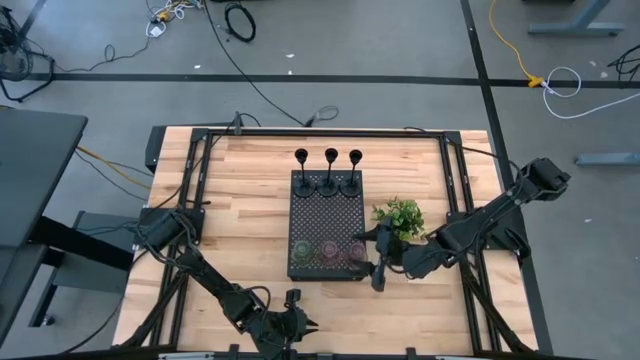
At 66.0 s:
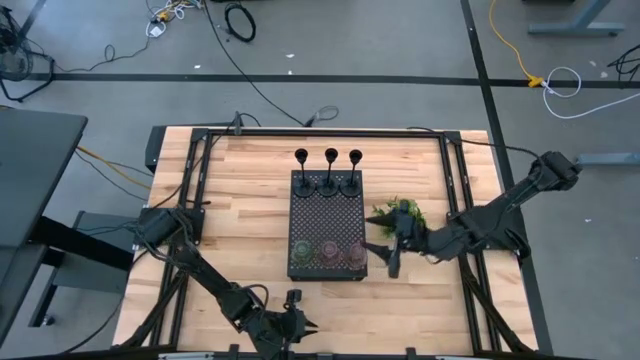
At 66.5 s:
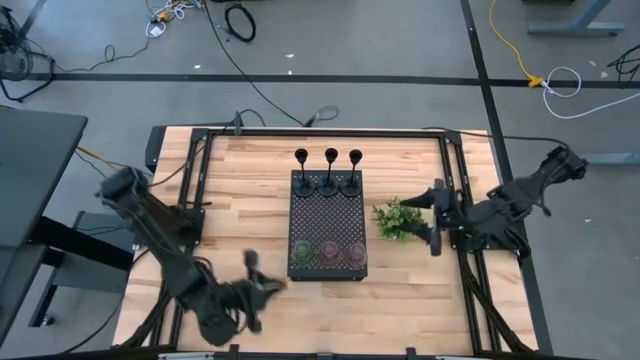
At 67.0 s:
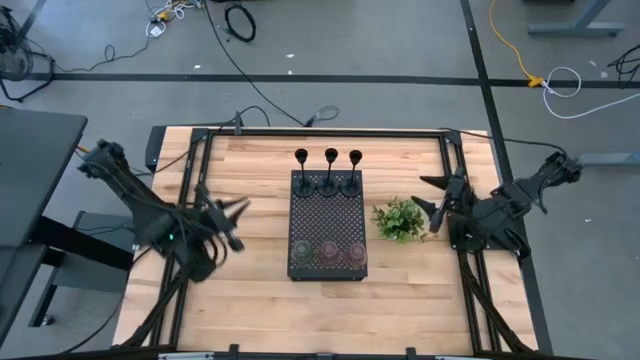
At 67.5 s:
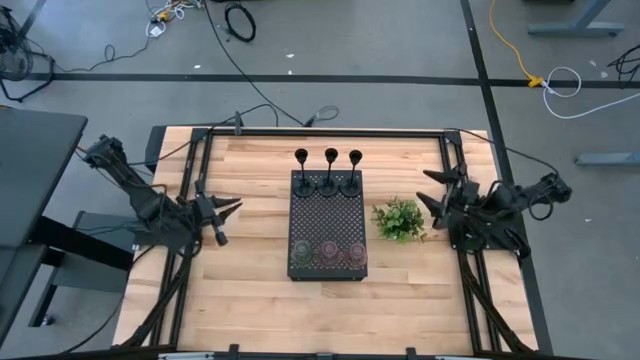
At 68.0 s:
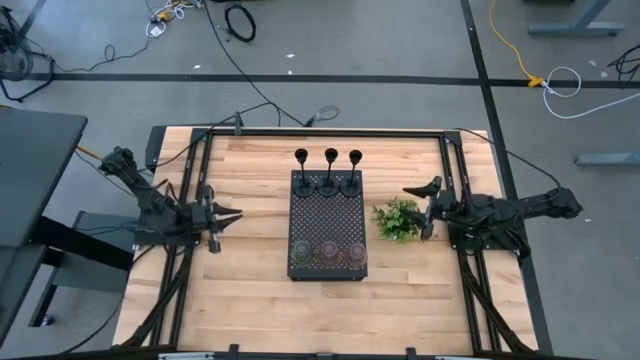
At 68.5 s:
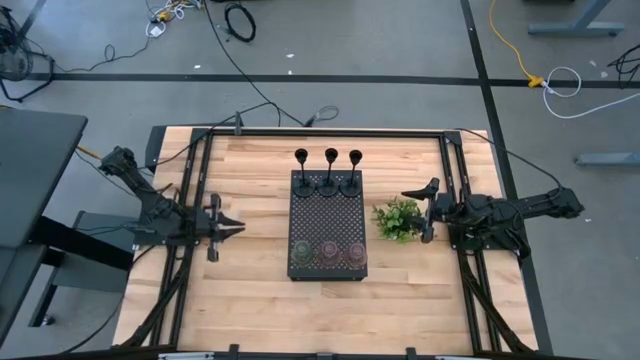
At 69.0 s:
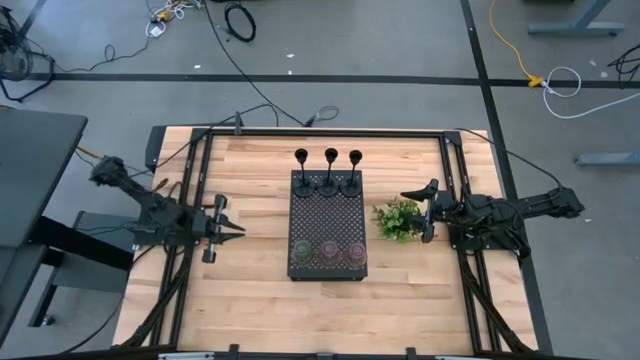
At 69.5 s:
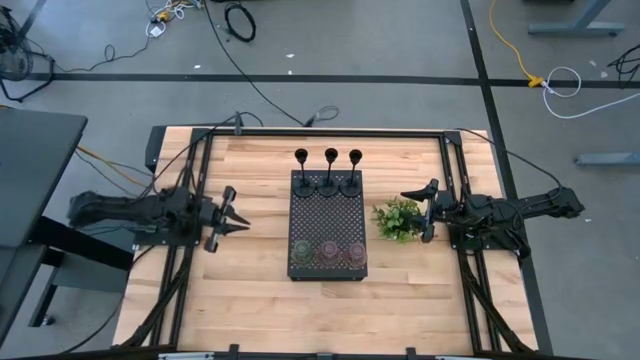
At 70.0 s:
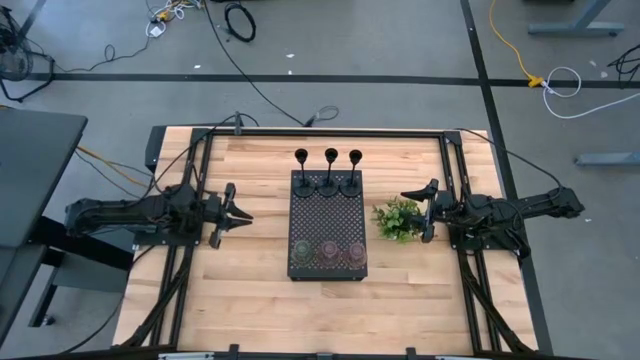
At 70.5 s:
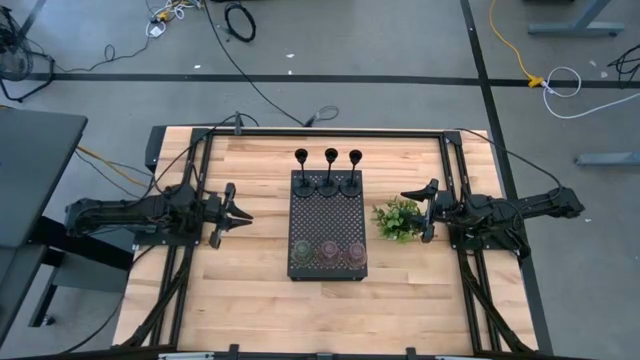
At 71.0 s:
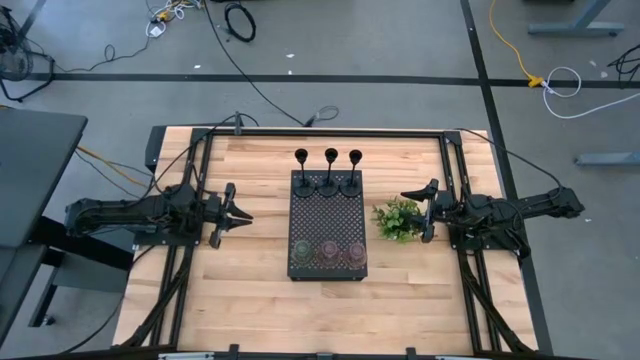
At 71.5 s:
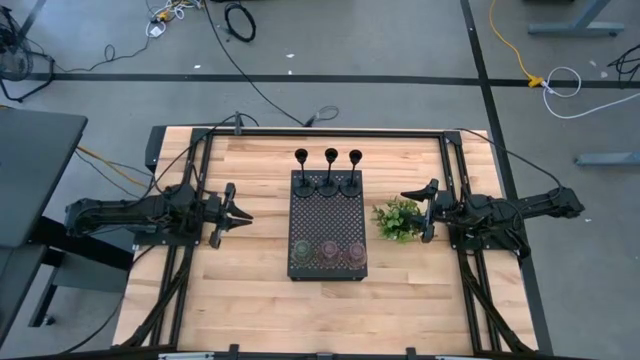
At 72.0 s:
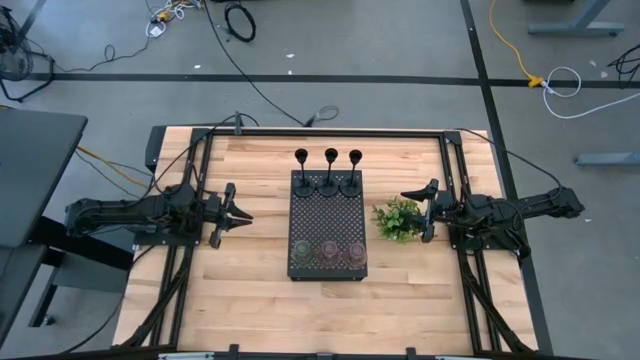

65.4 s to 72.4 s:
Task: Pick & Place candle stick holders
Return to Home Position

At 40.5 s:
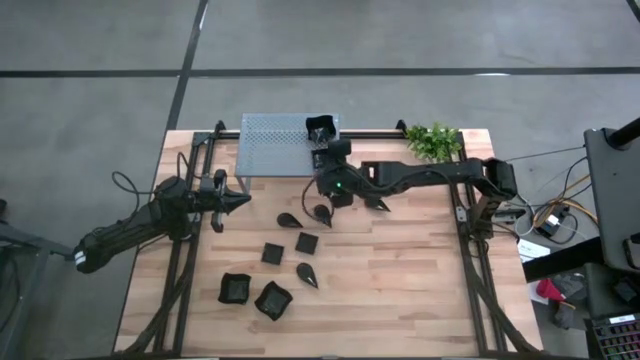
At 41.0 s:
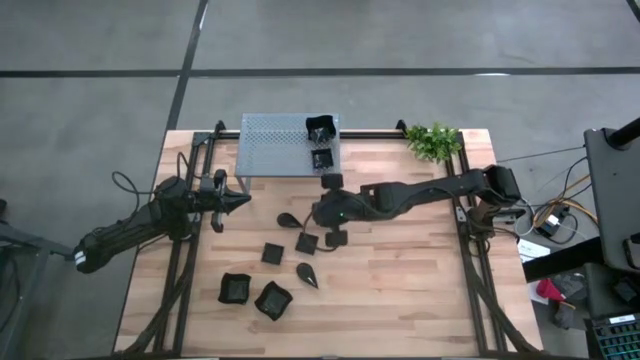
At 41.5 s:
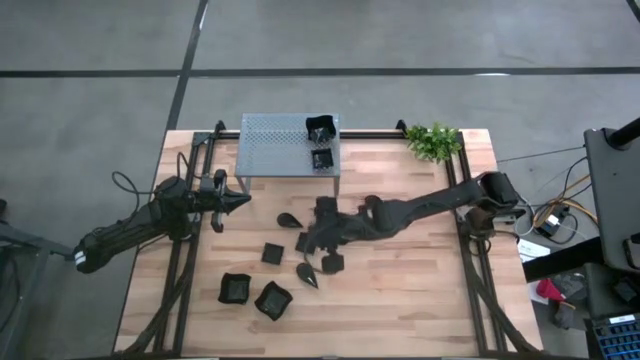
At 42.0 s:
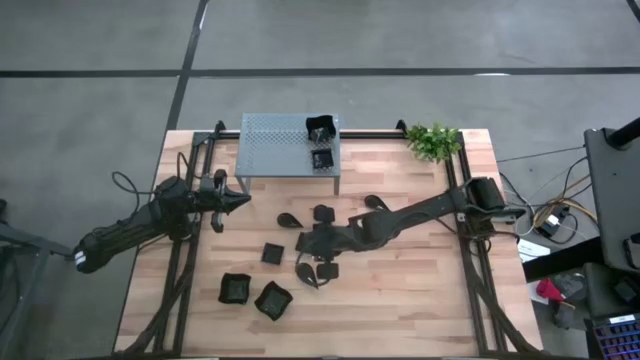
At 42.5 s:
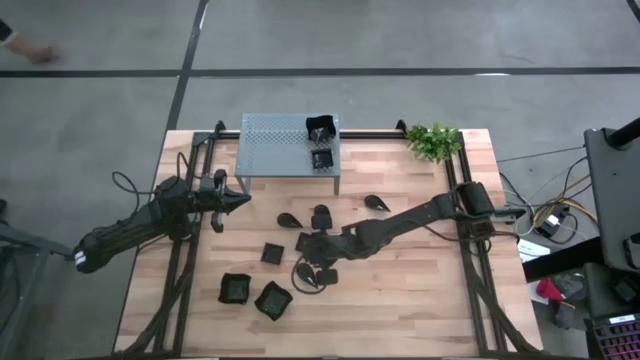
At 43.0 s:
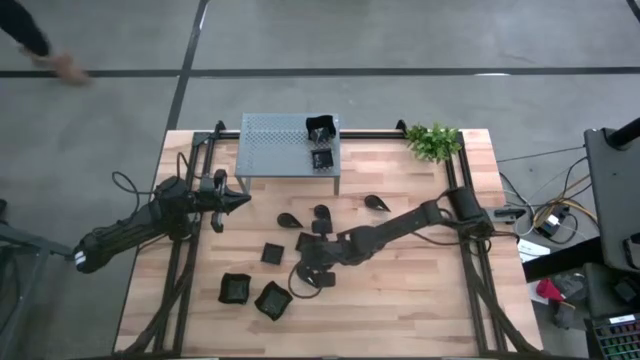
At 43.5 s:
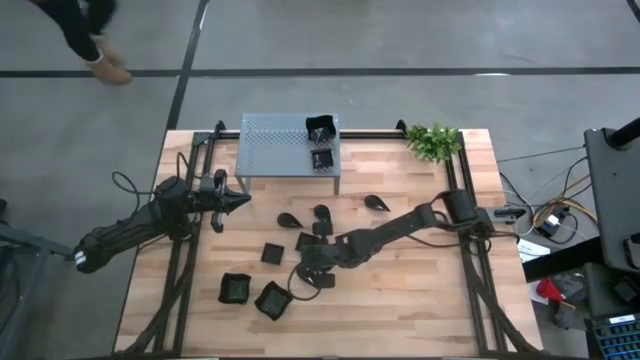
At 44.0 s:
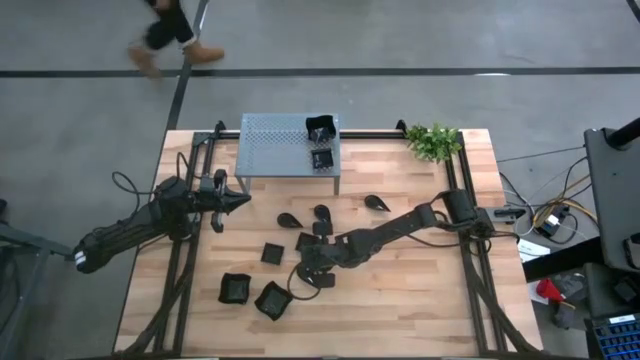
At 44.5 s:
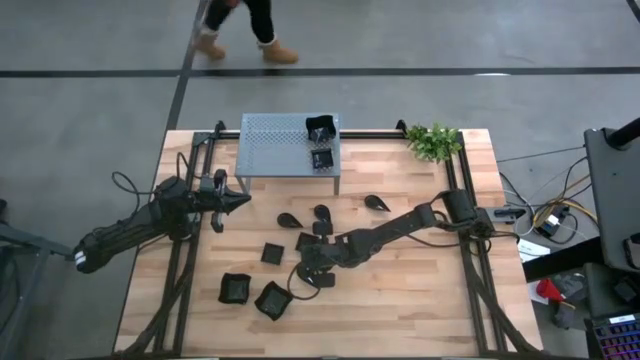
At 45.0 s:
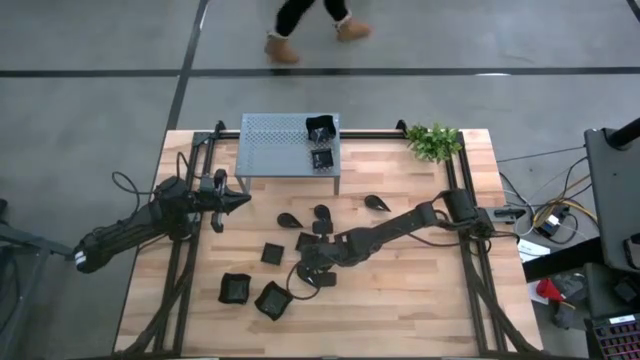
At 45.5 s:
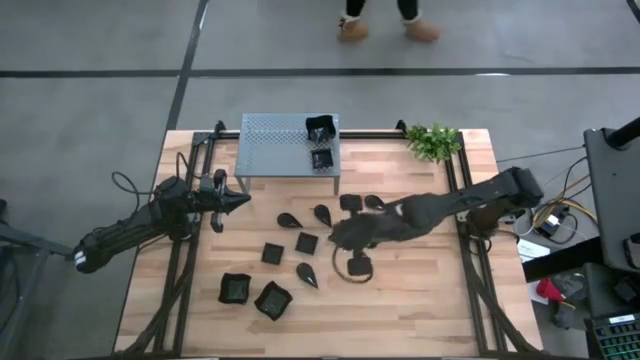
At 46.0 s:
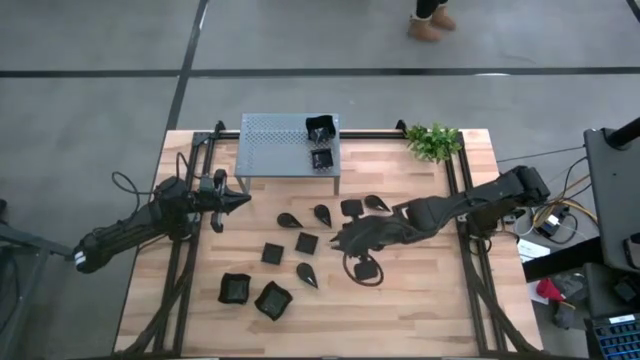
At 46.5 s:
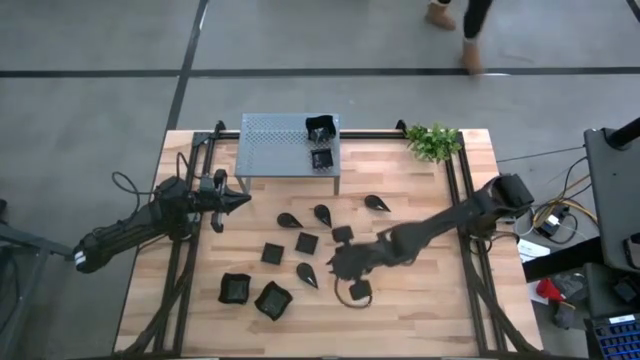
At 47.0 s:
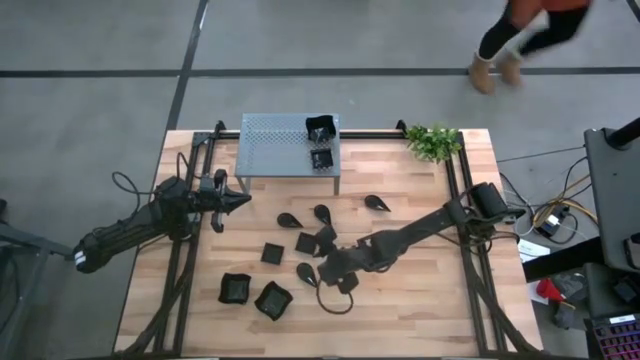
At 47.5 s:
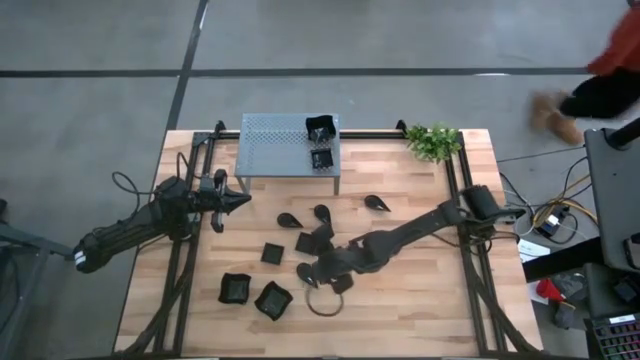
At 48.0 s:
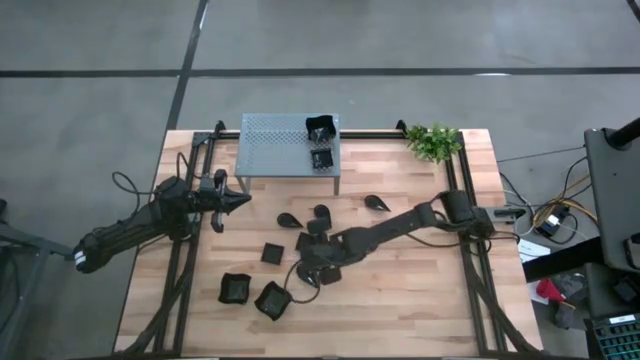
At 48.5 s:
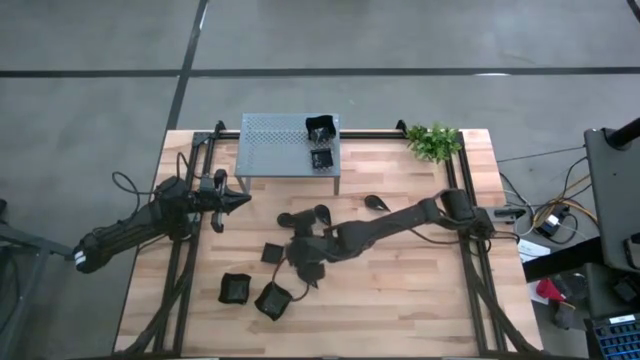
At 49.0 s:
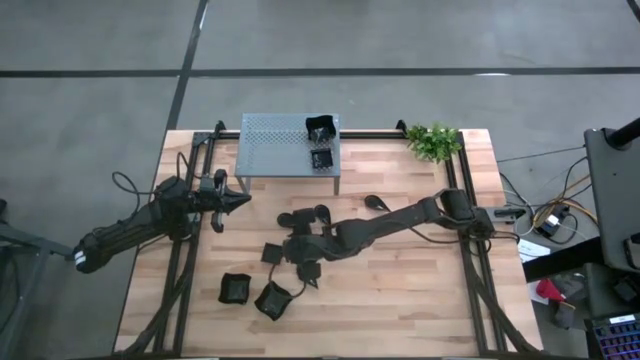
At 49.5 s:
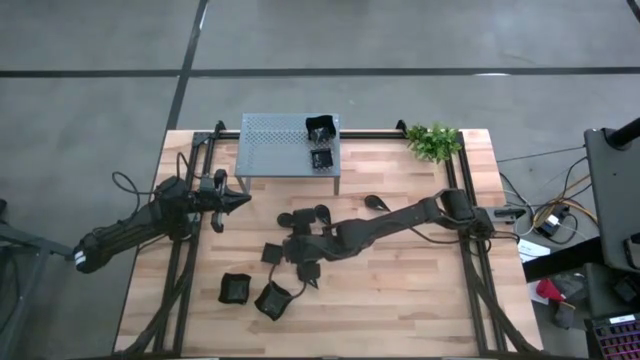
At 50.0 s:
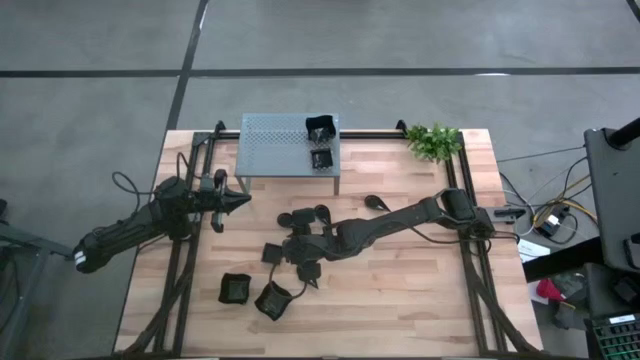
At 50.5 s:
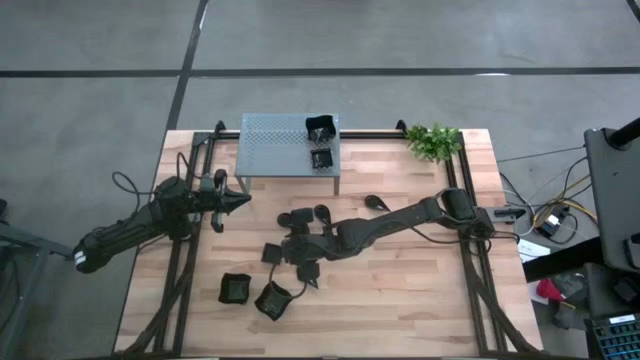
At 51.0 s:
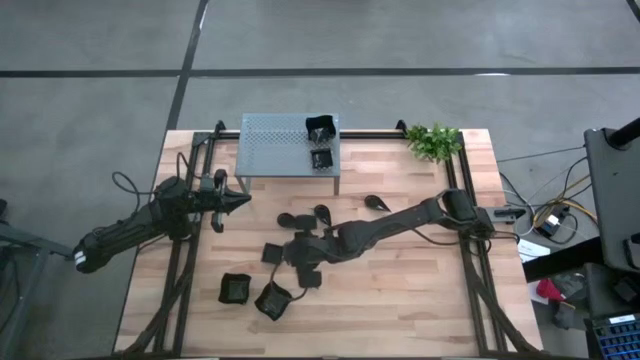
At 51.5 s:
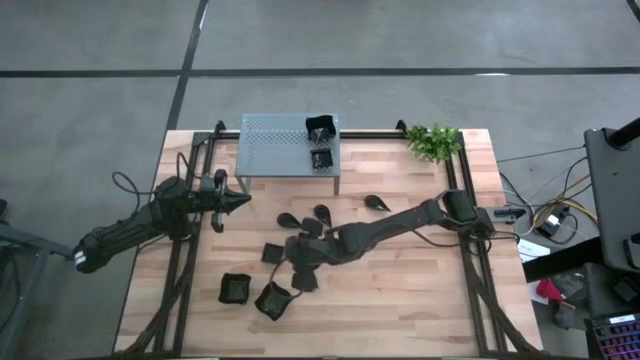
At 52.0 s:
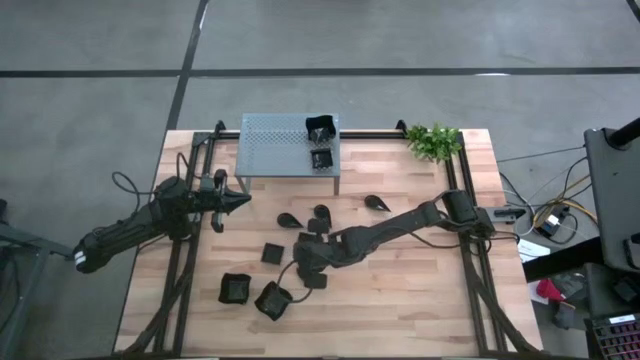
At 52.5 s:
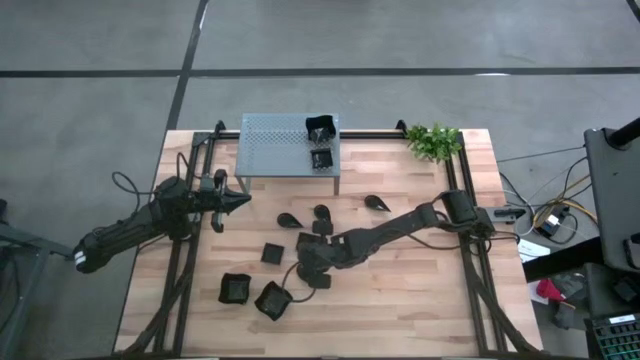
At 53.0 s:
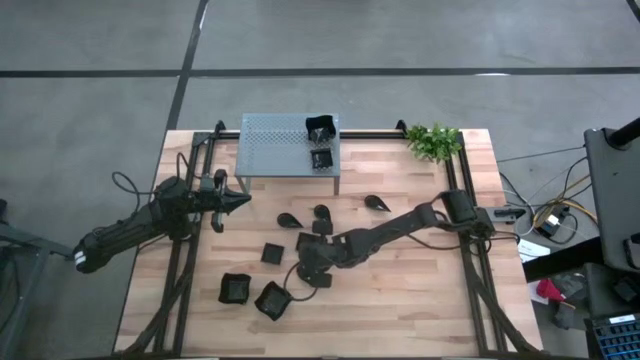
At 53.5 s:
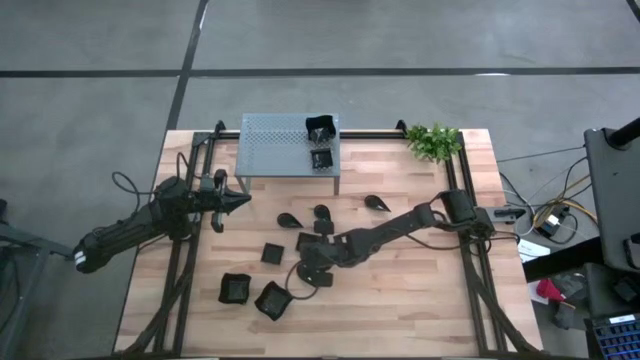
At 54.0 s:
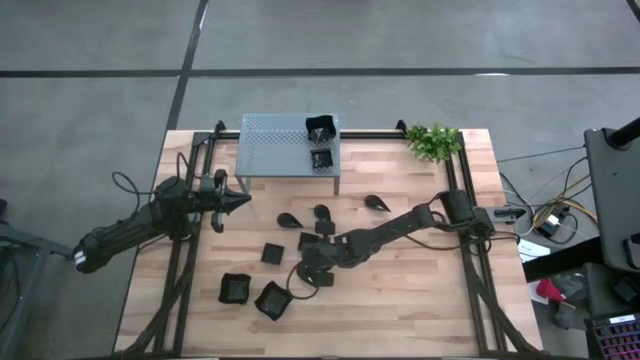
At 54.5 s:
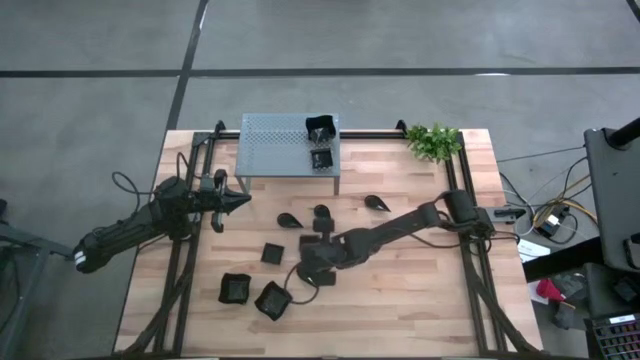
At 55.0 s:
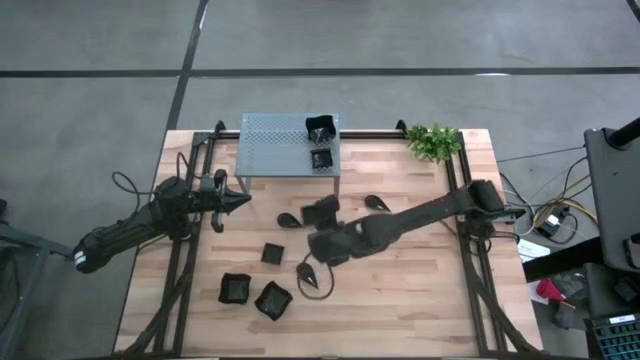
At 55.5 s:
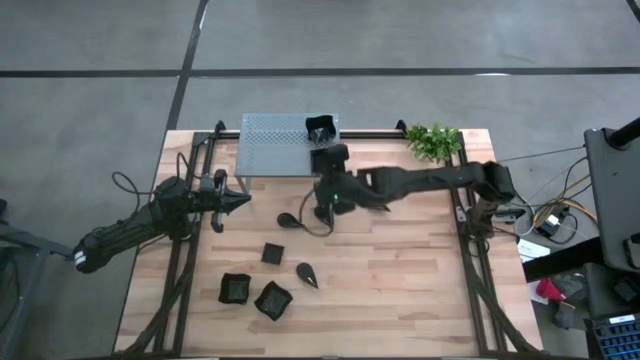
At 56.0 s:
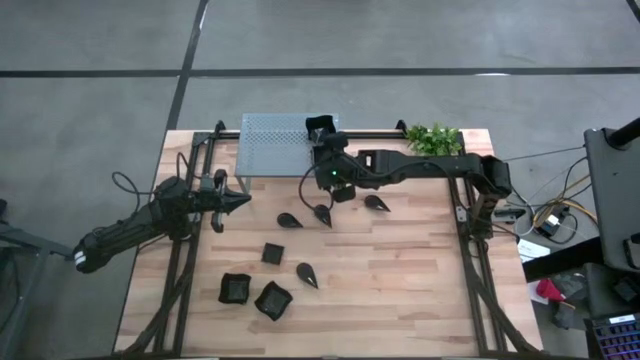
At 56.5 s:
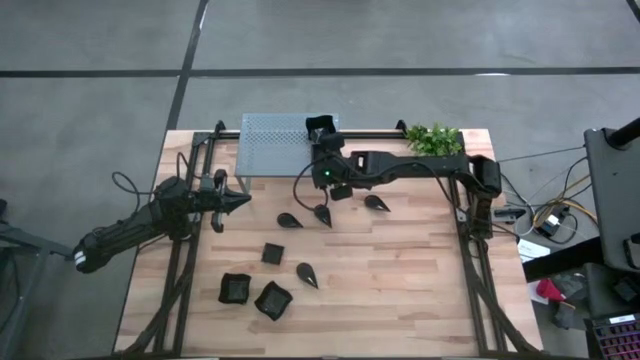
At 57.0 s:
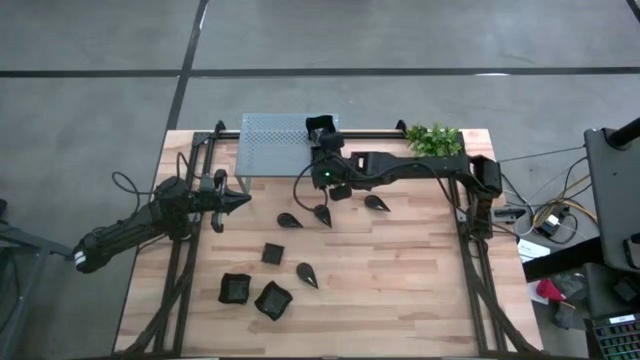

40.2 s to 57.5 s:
Task: Pick & Place Mini shaped plates
Stack the black square plate on top of the other black square plate on the shelf
